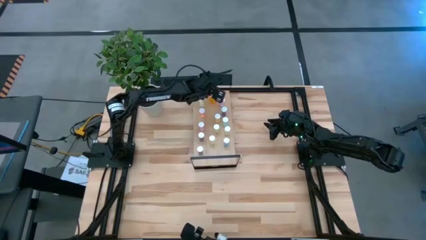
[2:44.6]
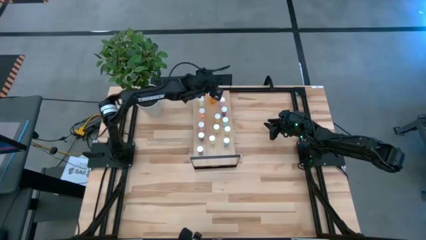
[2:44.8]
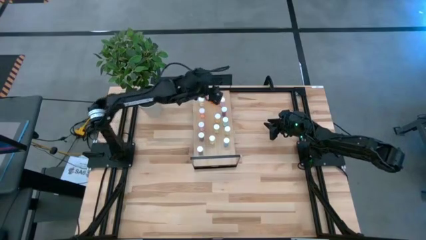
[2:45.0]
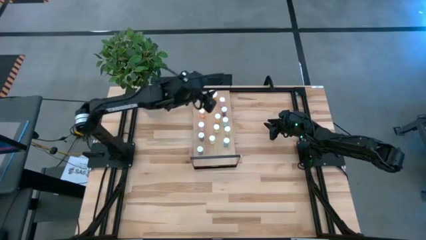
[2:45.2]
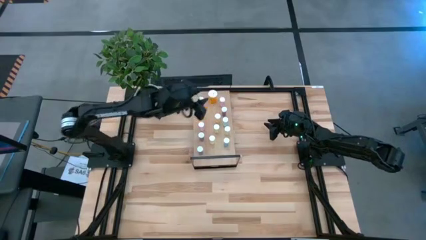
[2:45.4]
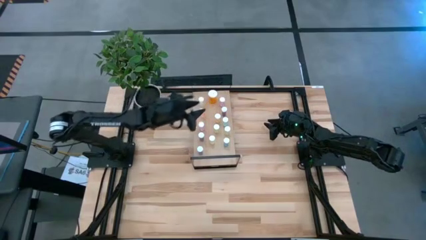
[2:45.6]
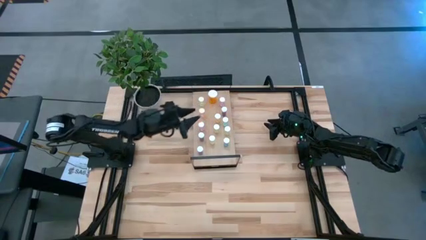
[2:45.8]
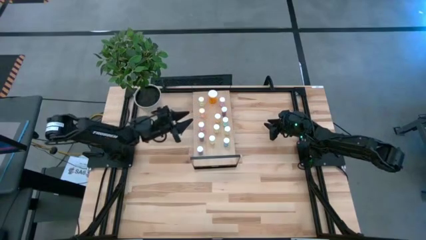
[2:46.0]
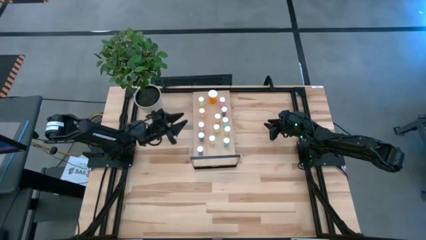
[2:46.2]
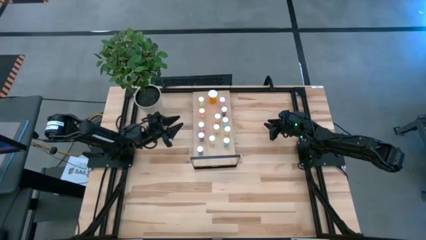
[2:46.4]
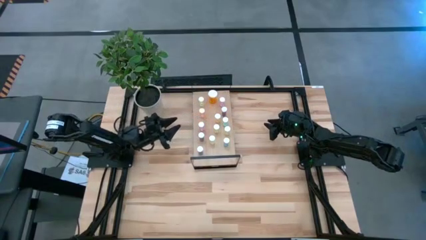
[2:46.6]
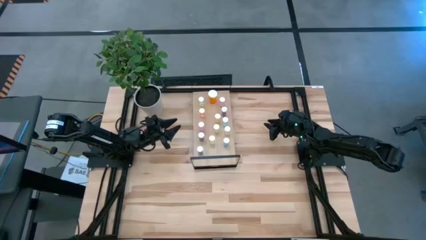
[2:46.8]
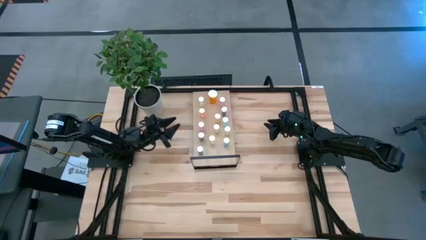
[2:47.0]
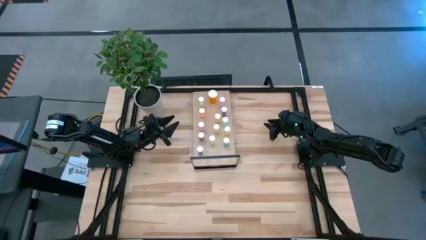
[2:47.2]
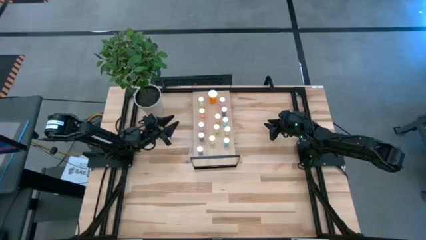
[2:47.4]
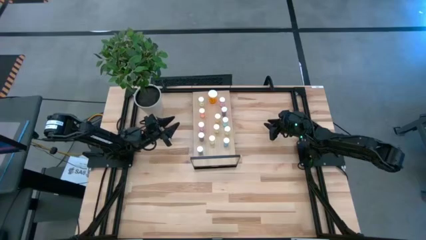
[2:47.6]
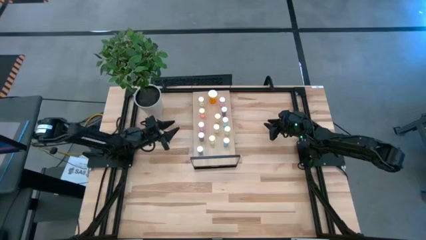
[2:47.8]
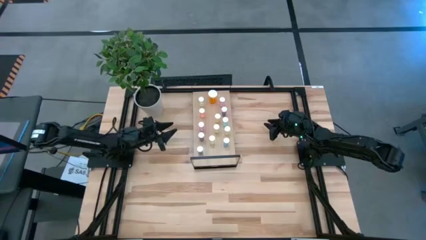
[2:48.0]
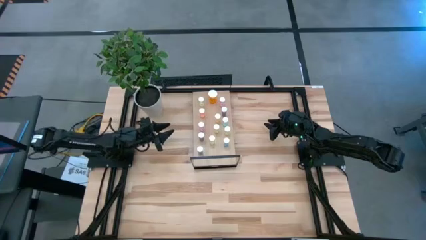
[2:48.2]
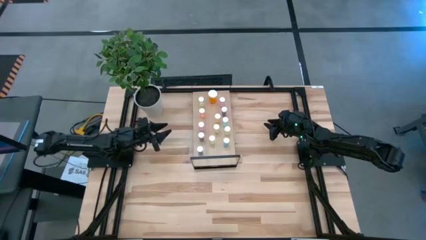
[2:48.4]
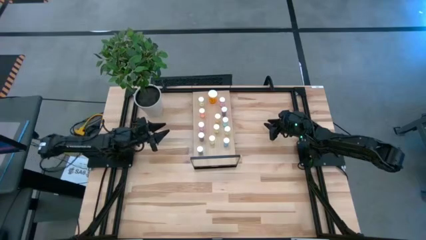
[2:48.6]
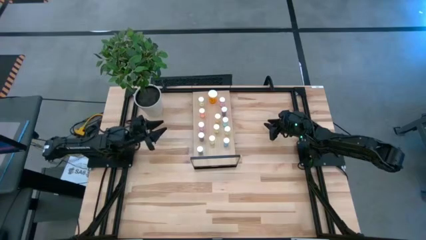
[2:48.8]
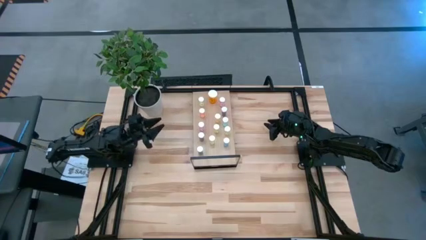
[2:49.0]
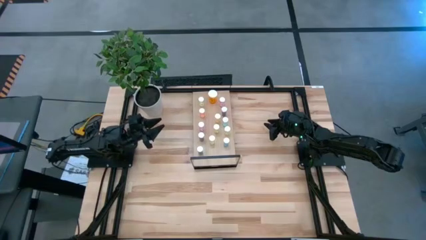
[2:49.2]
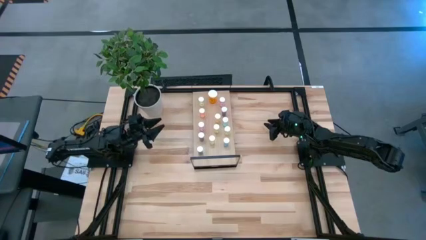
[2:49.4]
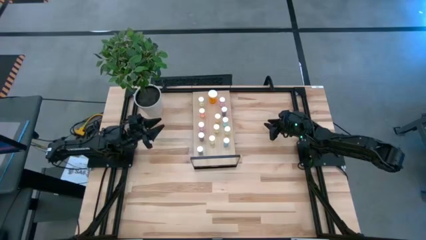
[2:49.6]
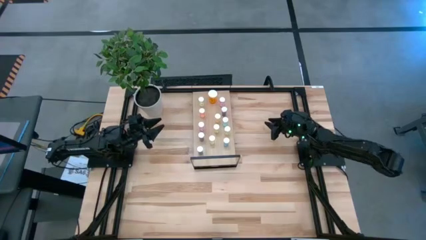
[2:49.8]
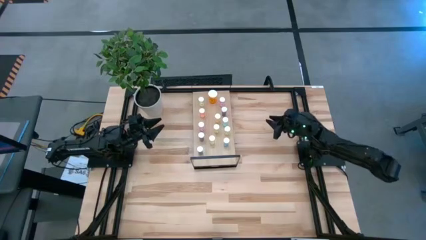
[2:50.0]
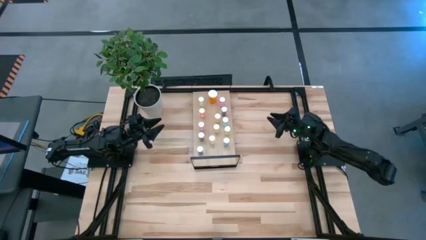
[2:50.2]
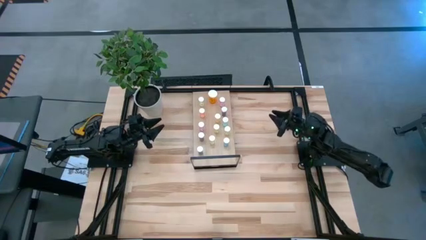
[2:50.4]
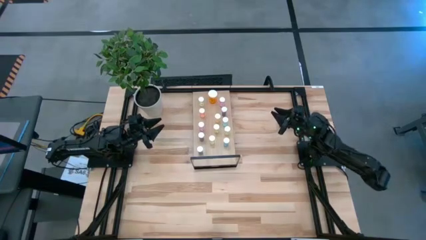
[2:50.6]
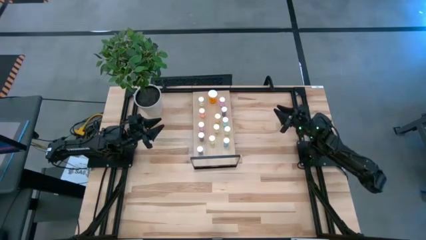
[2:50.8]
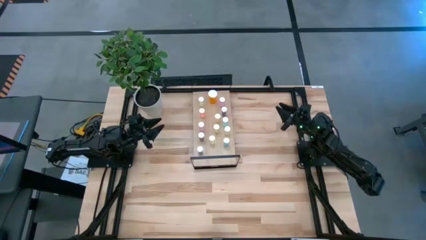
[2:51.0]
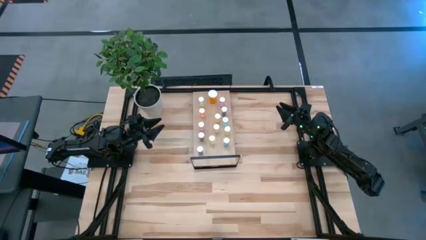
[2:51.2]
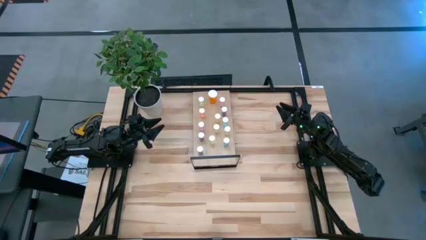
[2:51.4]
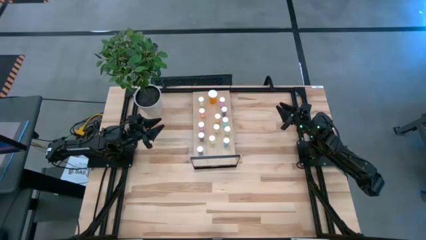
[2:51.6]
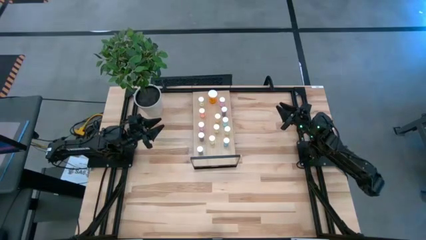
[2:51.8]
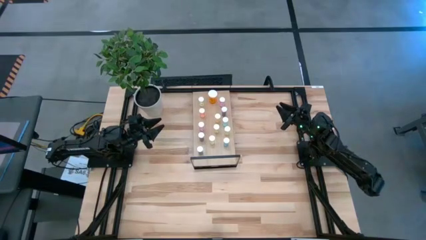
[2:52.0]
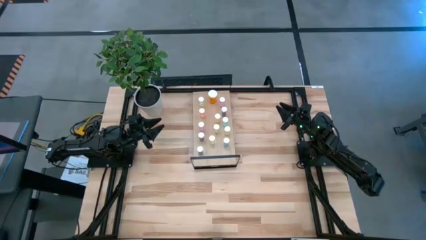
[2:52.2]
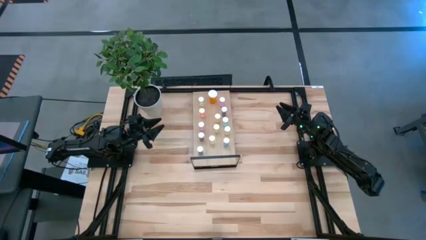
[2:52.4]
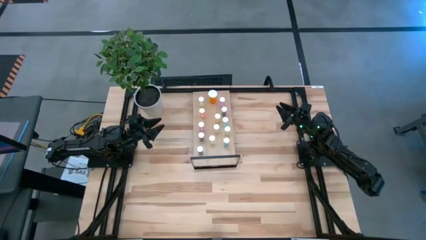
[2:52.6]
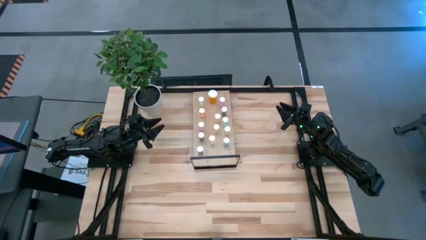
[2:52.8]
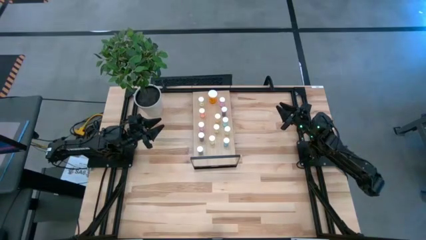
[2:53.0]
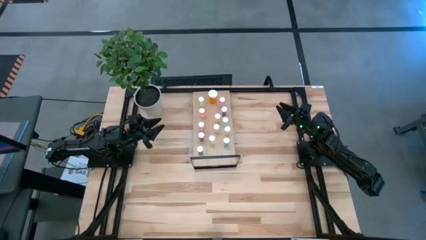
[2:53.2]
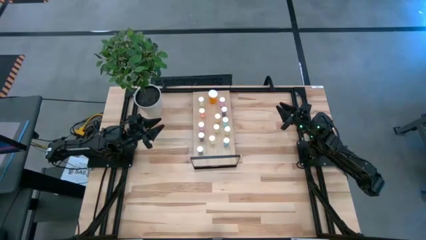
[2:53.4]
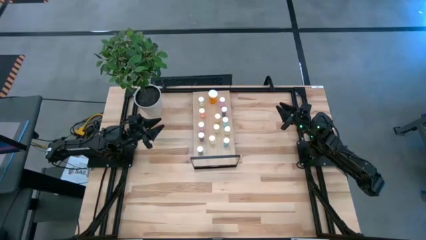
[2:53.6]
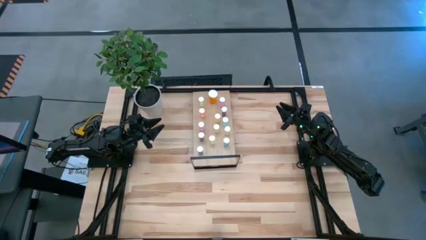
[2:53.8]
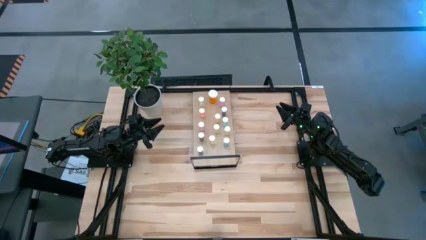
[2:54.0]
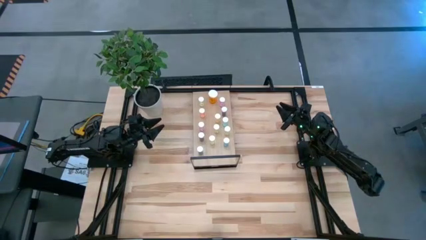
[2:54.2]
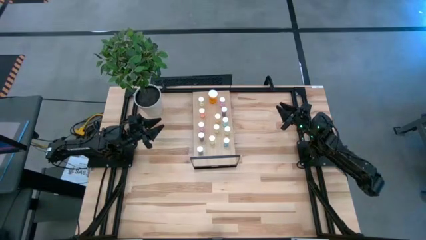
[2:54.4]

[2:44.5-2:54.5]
Task: Pick and place medicine bottles onto shelf by color
Return to Home Position
